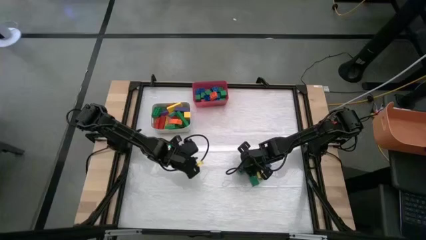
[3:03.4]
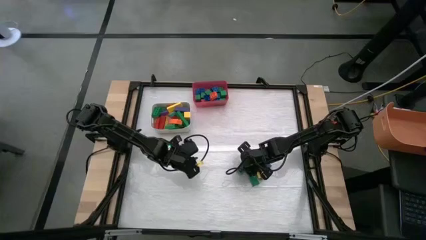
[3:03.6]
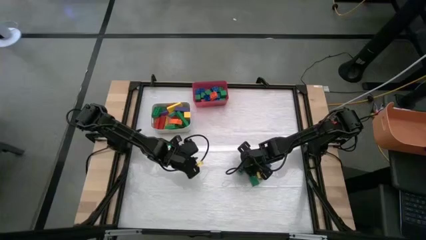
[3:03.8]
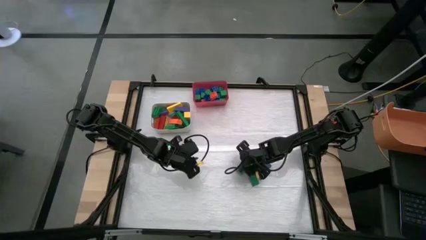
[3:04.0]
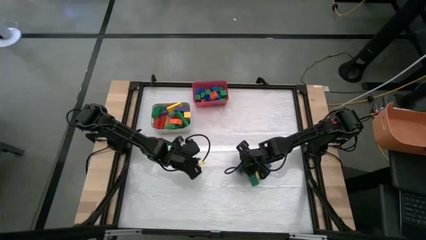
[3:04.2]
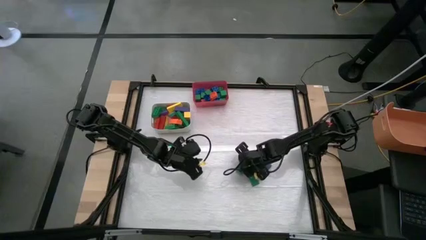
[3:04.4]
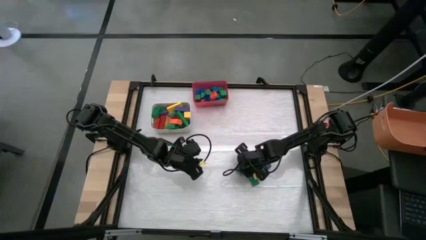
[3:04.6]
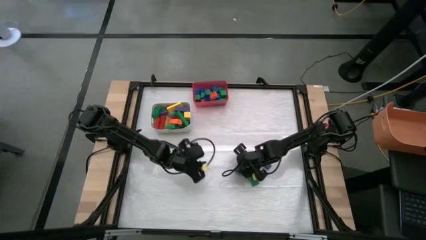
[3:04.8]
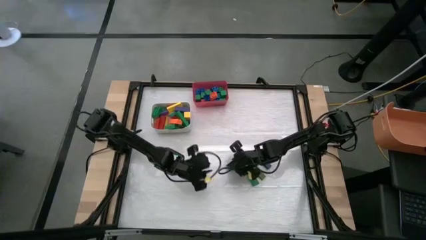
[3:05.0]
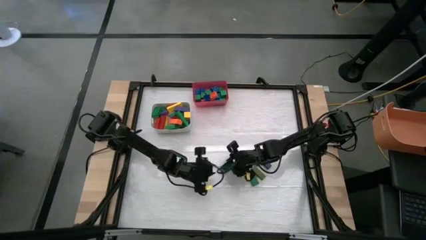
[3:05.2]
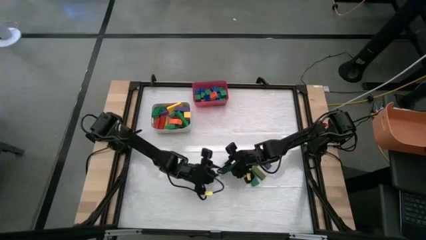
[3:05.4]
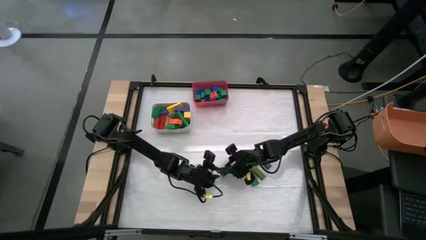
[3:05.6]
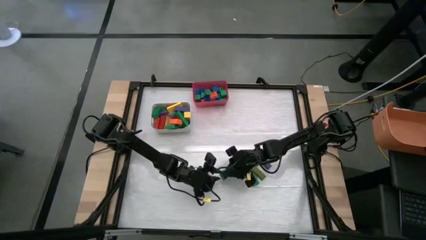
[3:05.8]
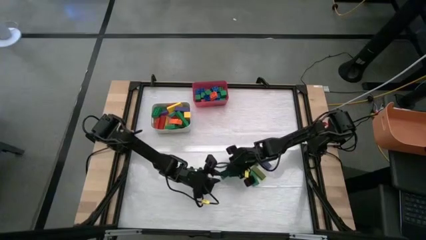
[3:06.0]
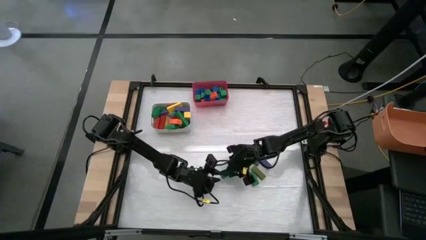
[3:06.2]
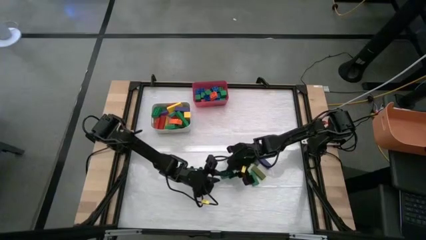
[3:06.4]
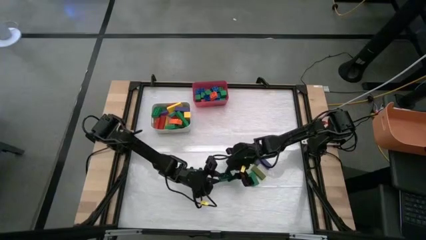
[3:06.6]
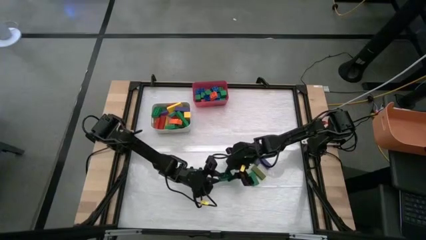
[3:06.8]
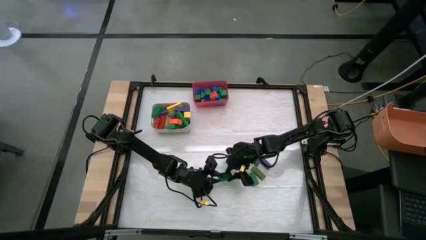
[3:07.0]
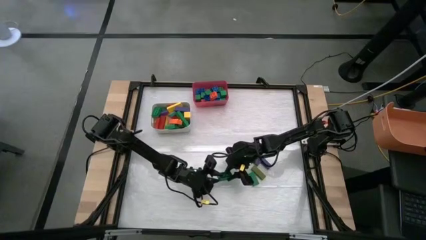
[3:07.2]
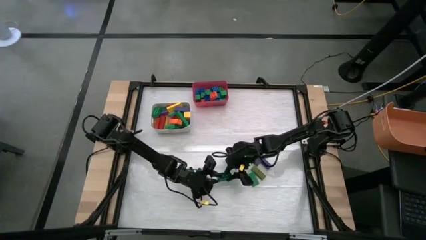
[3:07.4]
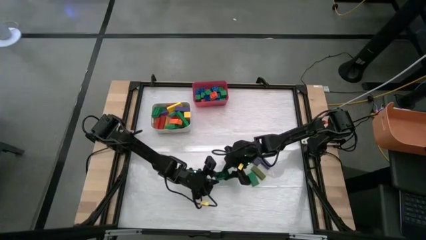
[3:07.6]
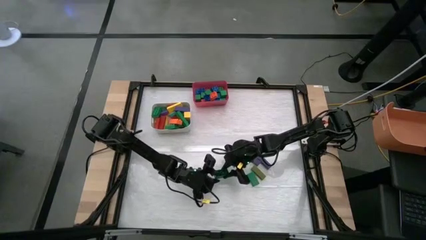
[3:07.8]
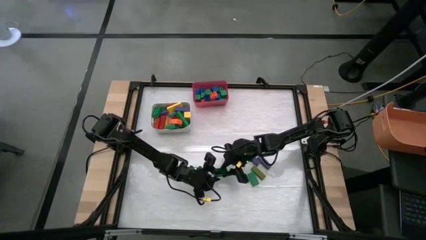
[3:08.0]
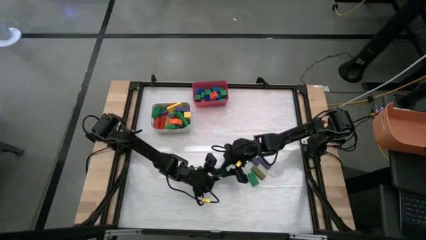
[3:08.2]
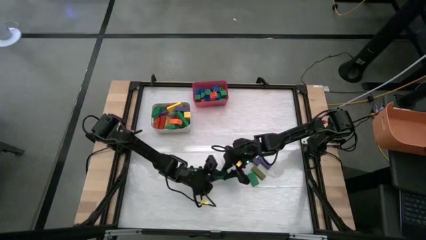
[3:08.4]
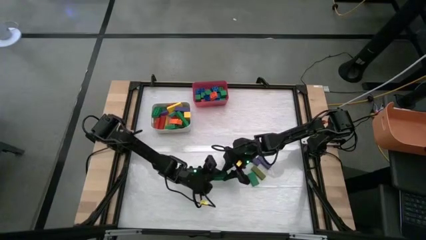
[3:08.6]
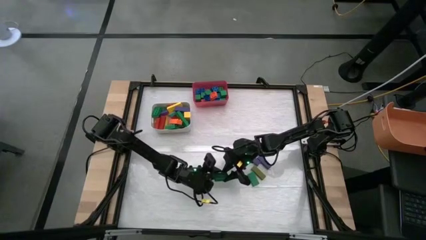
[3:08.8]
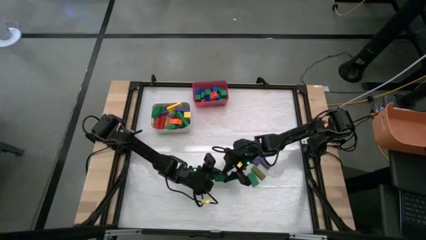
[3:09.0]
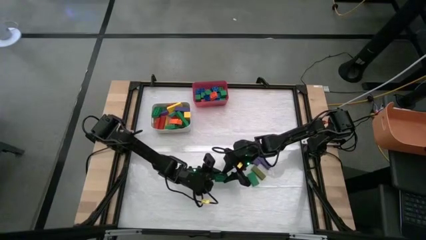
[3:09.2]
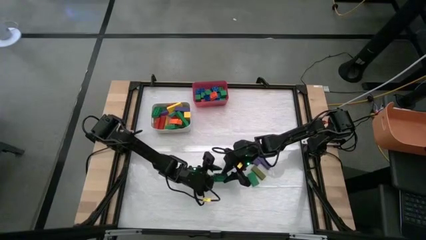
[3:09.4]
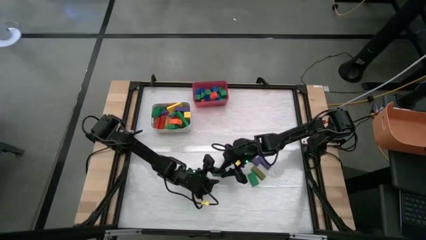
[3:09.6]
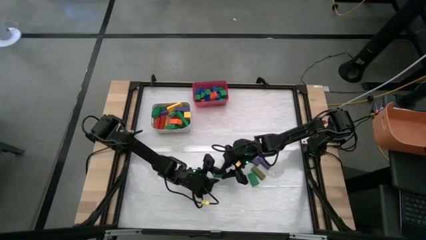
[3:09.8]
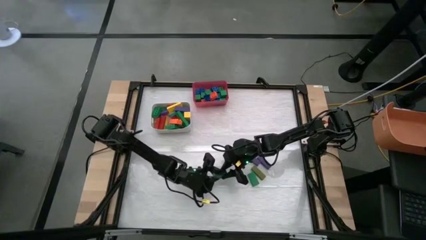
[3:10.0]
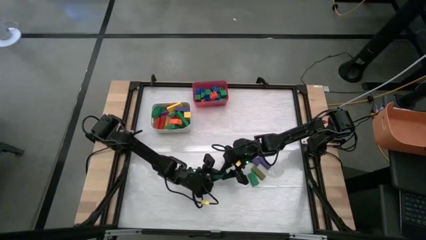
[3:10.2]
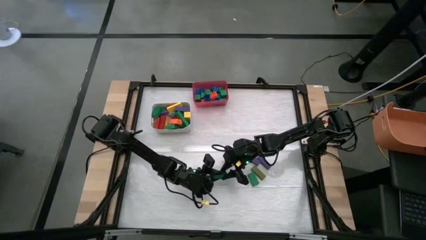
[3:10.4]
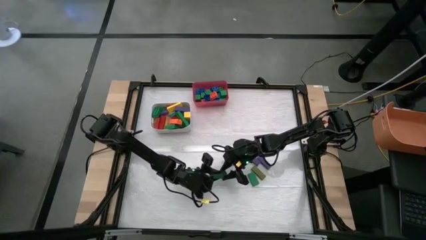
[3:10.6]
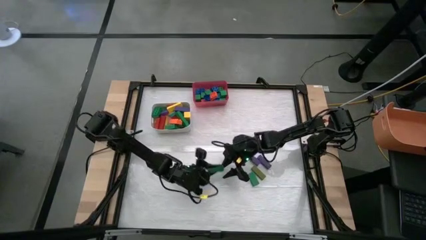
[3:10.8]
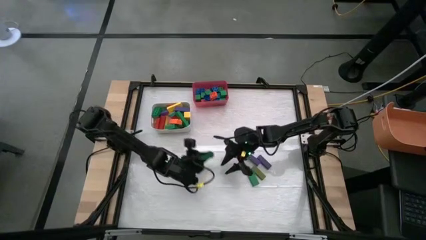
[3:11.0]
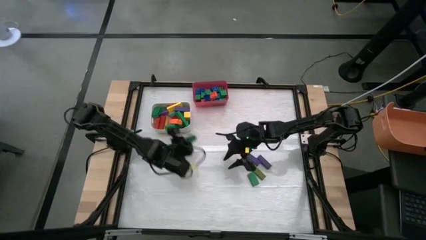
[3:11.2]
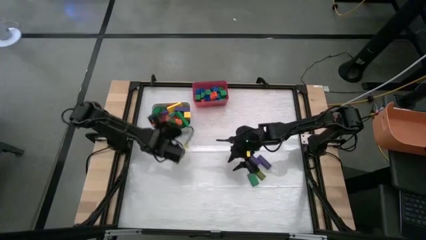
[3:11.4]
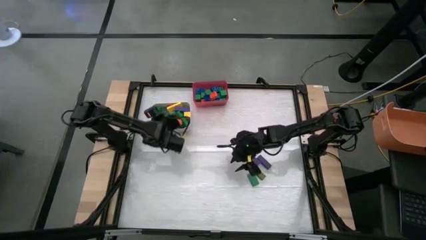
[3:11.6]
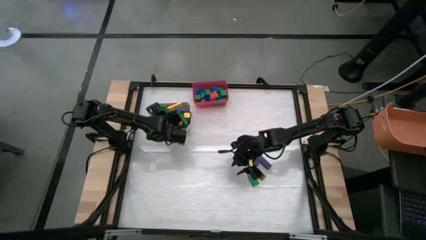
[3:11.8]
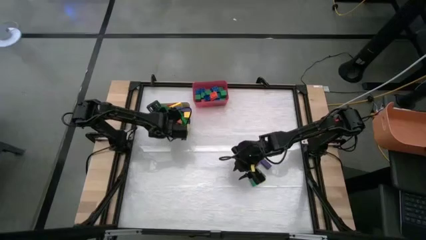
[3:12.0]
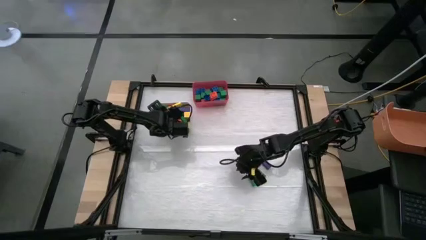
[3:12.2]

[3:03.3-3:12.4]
Task: Sort blocks by size
Put the large green game piece into the white bin

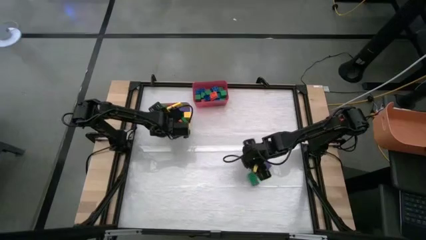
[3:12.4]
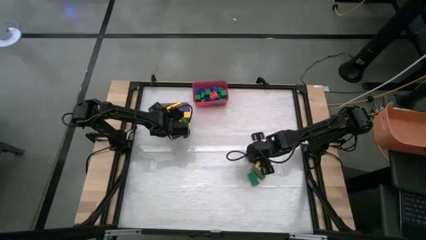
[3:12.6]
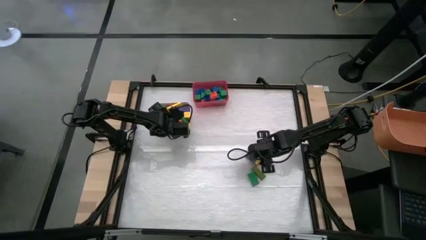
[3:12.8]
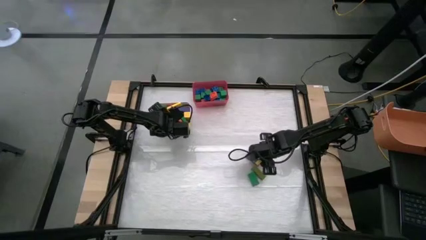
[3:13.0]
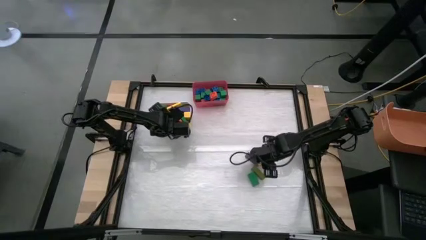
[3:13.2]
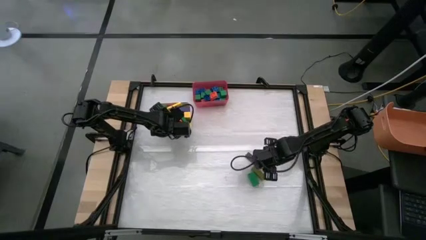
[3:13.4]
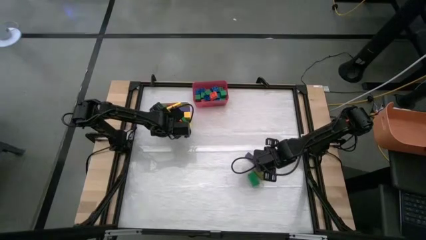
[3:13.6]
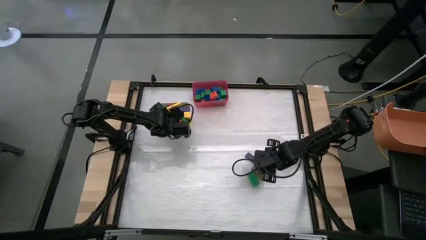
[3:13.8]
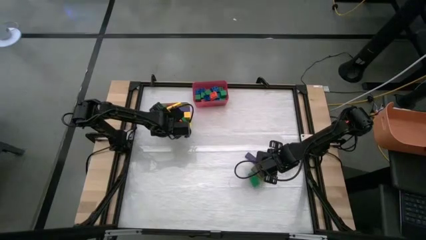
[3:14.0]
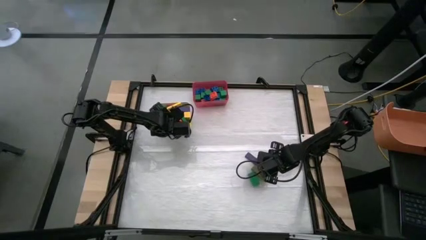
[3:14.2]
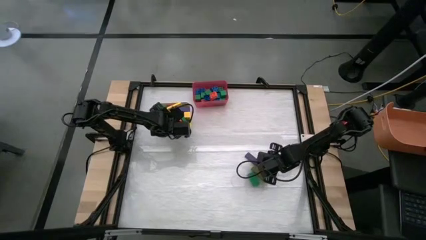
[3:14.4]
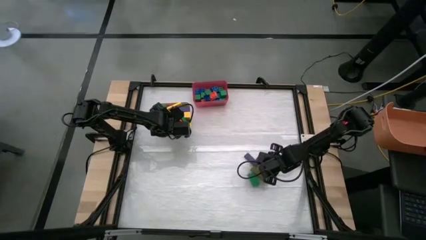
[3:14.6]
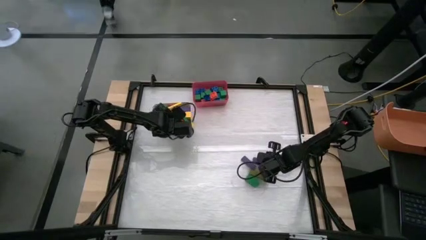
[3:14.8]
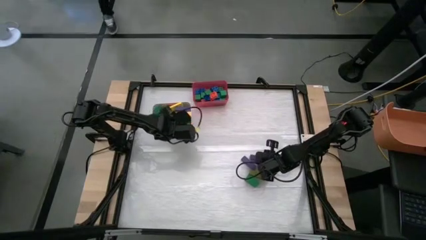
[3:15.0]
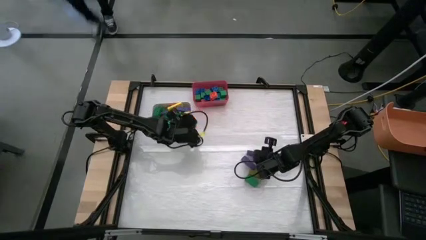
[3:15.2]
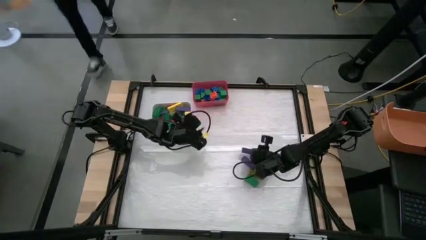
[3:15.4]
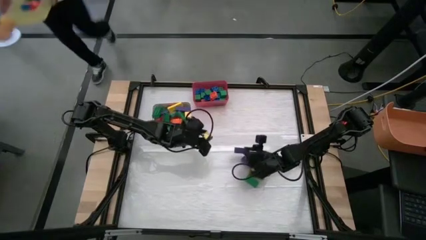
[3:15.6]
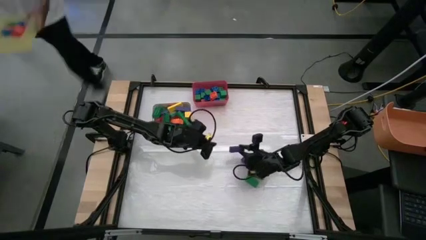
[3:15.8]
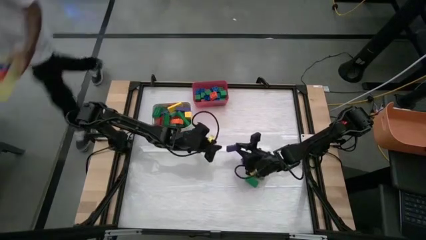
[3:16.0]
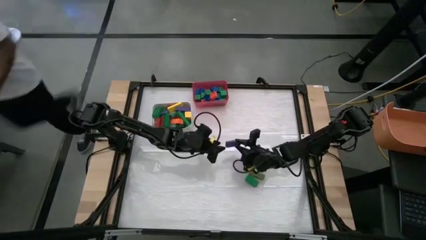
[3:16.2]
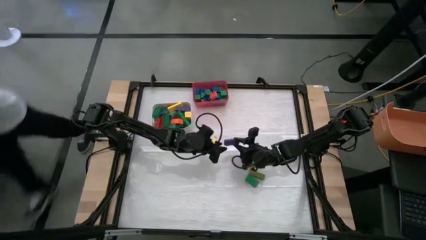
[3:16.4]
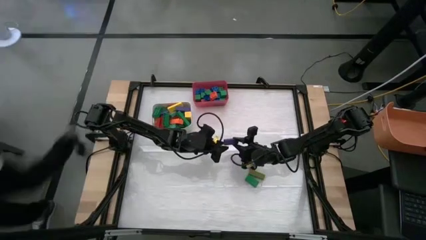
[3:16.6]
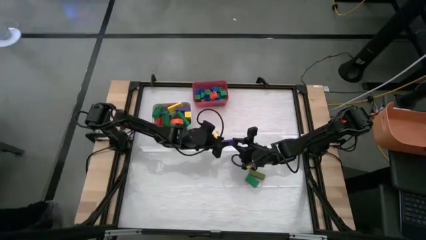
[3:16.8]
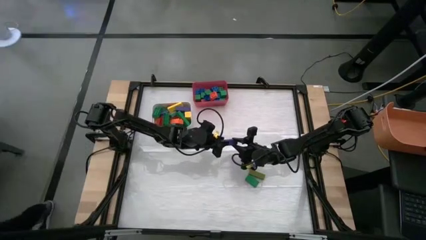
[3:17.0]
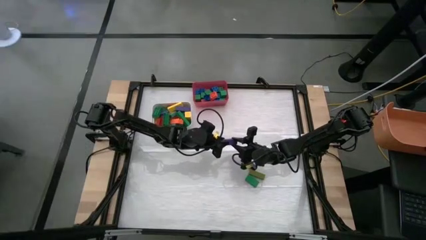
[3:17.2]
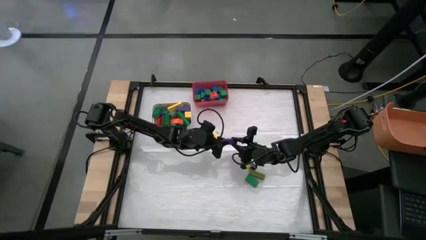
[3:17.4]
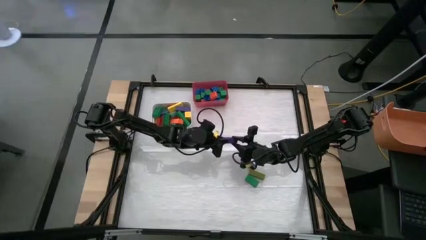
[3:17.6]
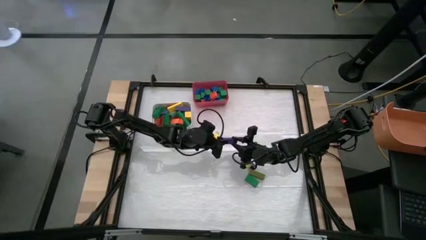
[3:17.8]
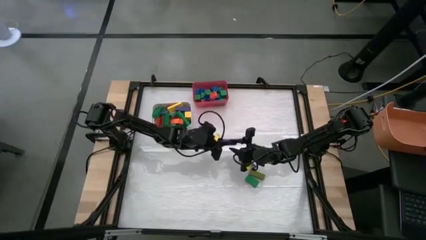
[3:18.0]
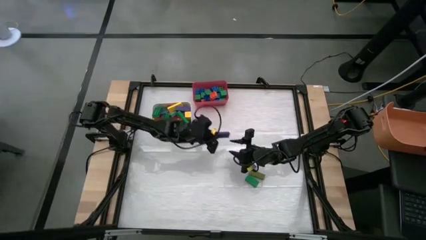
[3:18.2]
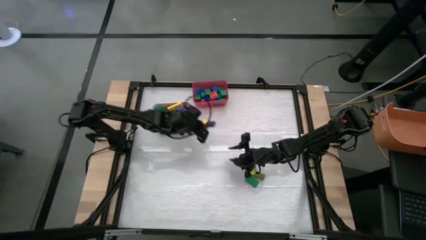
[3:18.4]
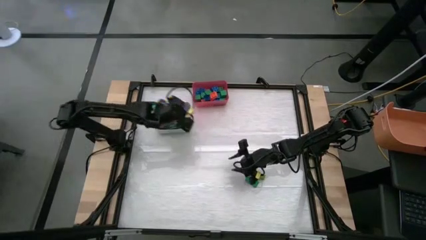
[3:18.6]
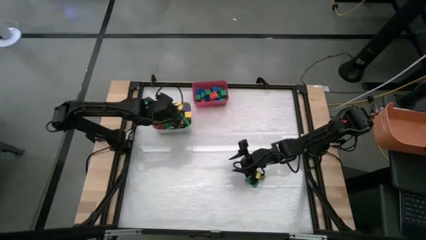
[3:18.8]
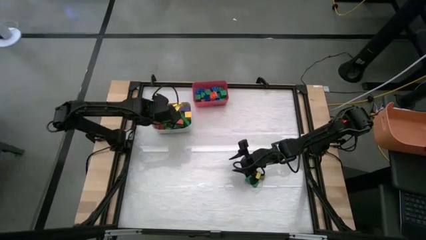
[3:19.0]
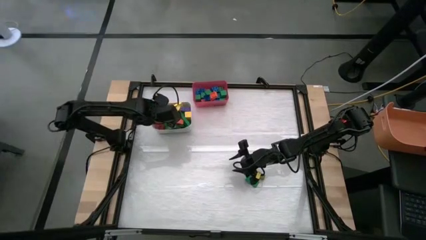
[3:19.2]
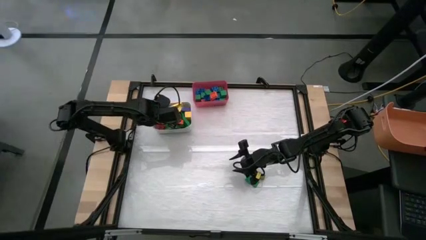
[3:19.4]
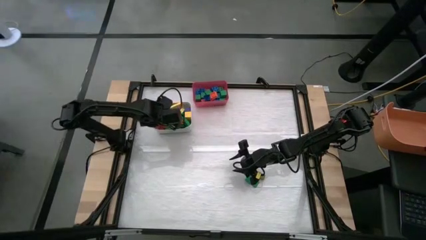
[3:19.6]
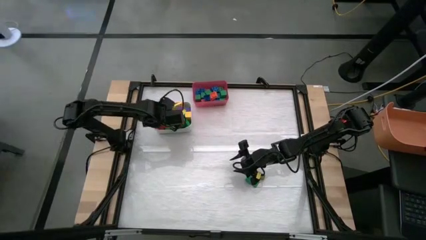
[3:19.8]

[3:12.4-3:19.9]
Put the large violet wooden block into the white bin
